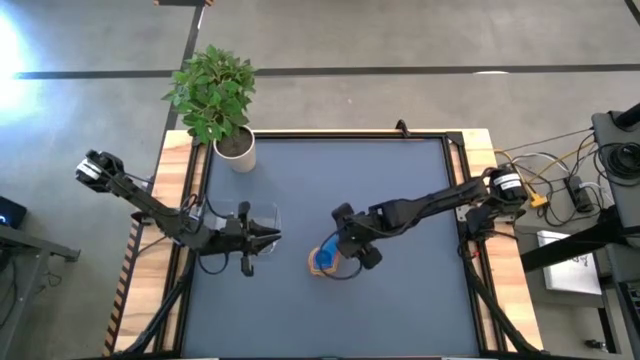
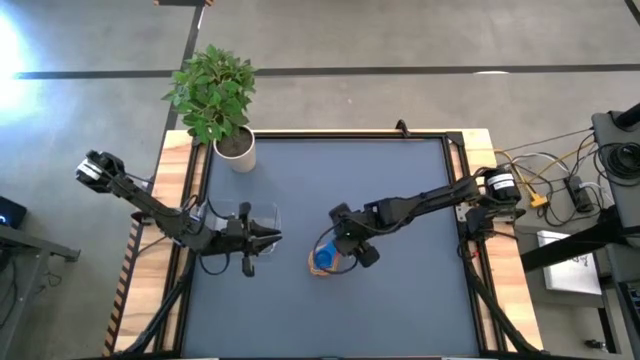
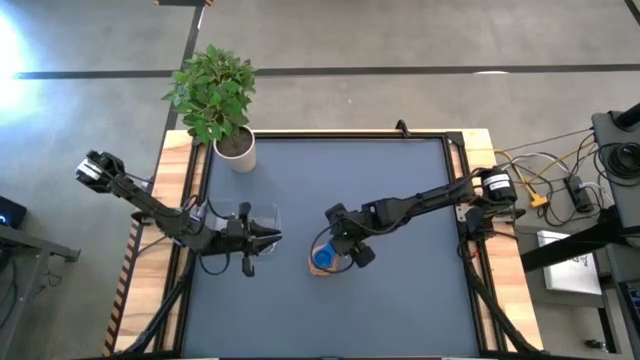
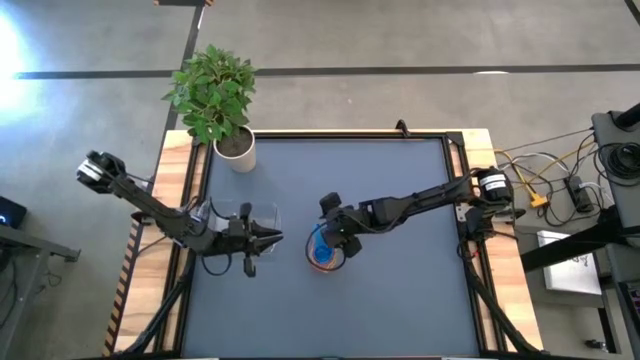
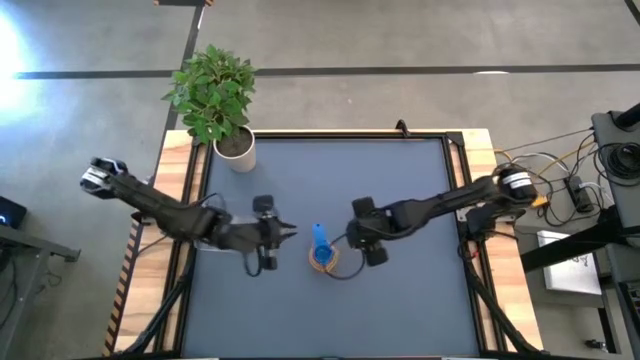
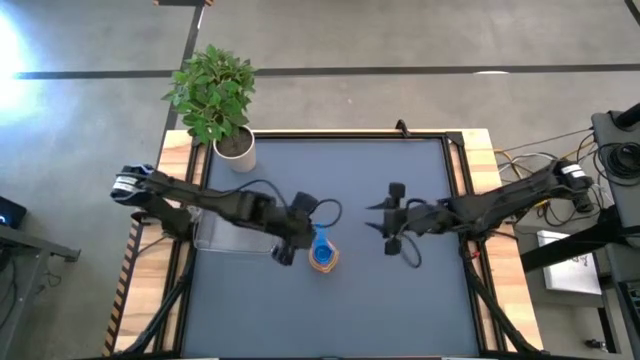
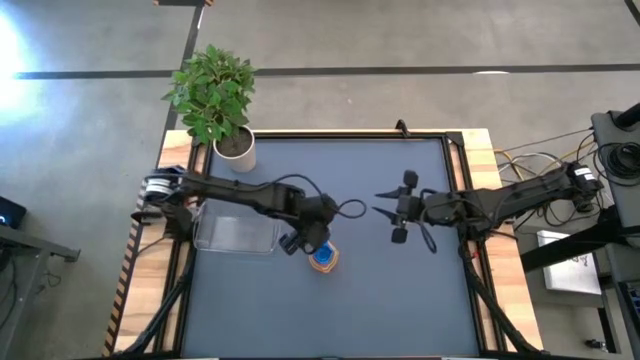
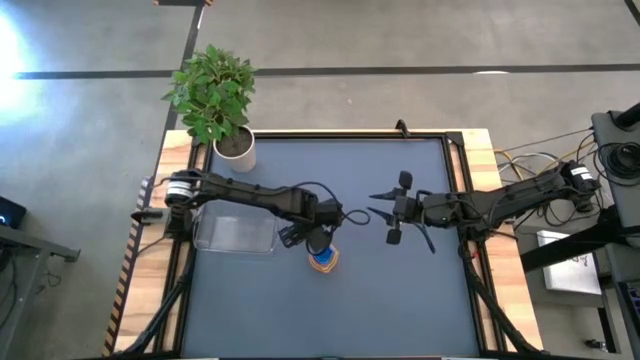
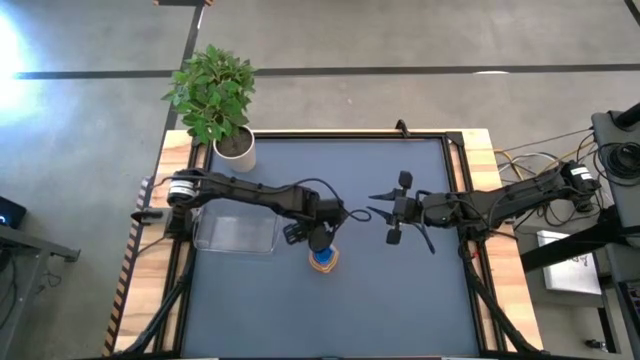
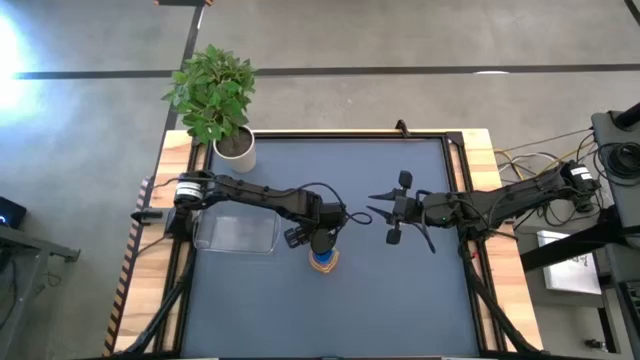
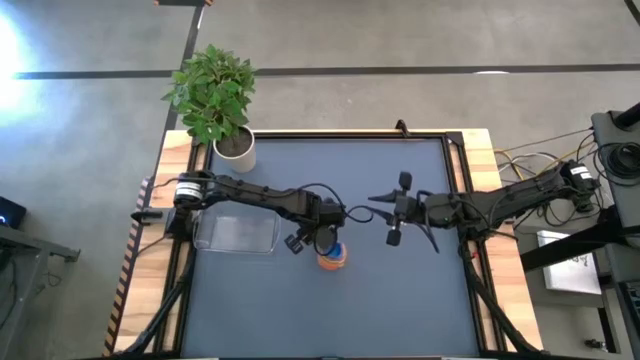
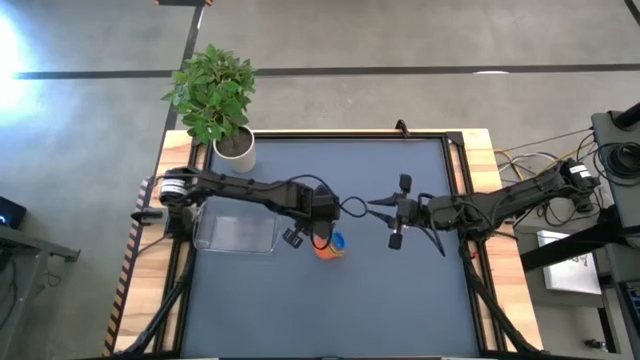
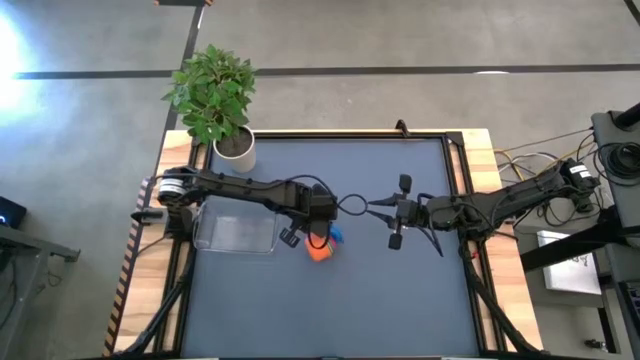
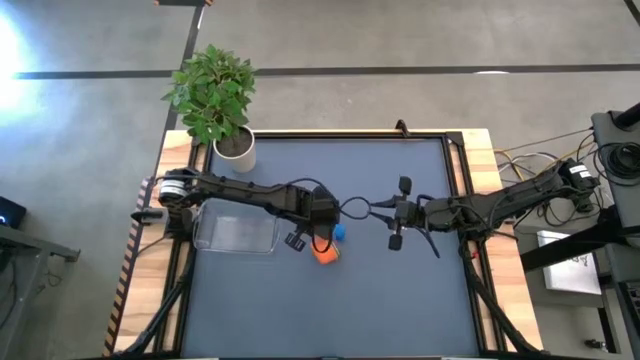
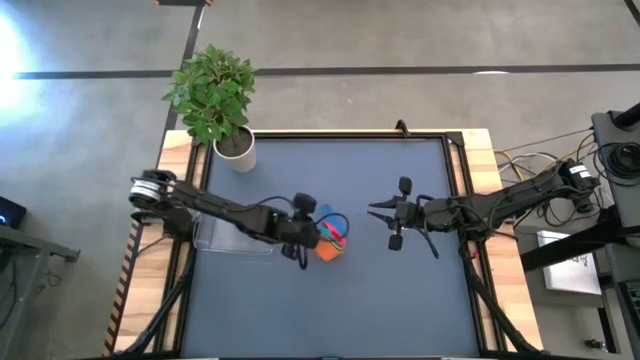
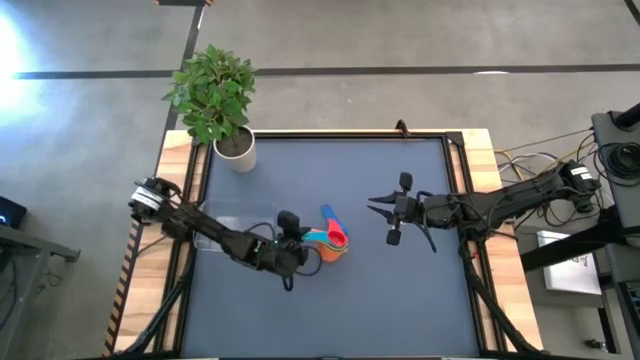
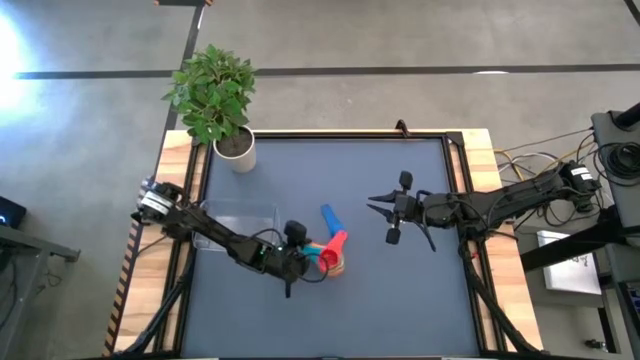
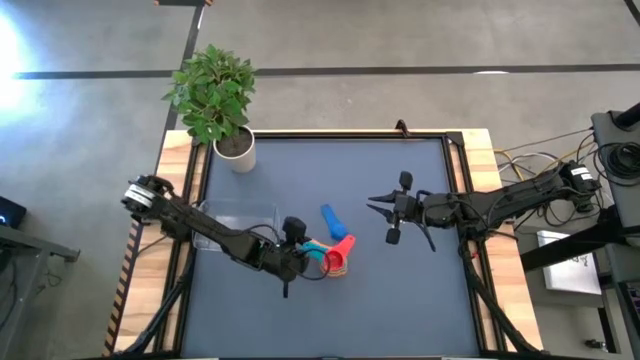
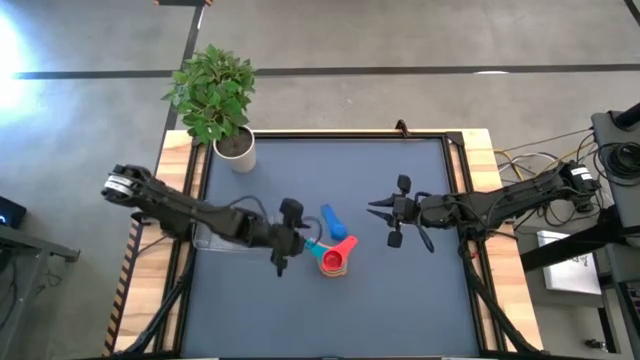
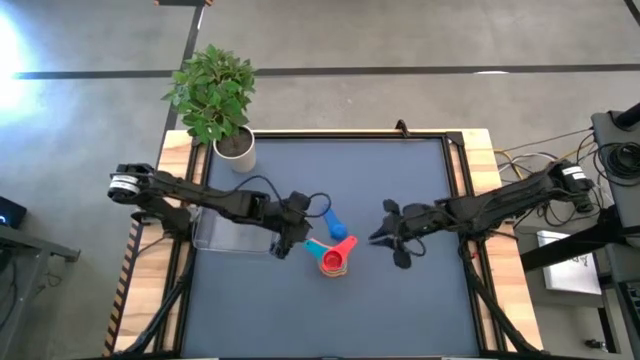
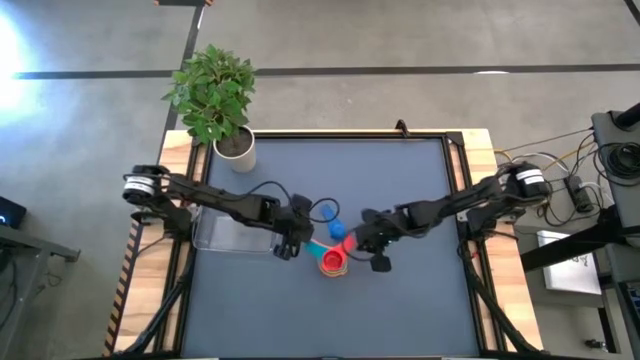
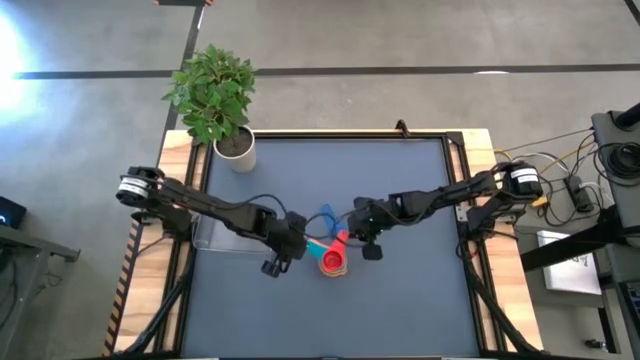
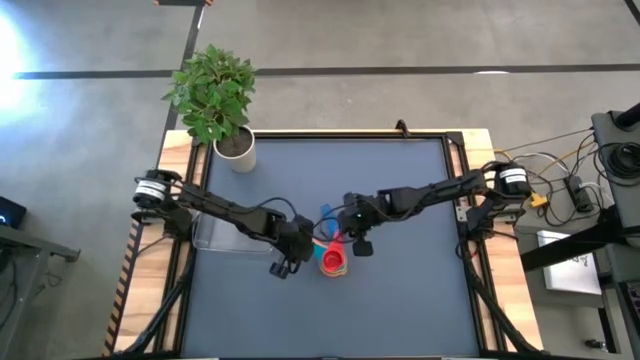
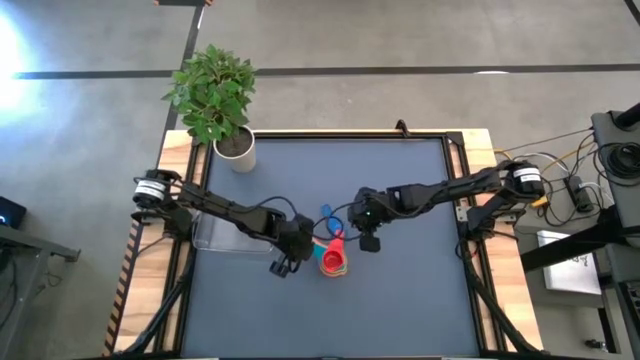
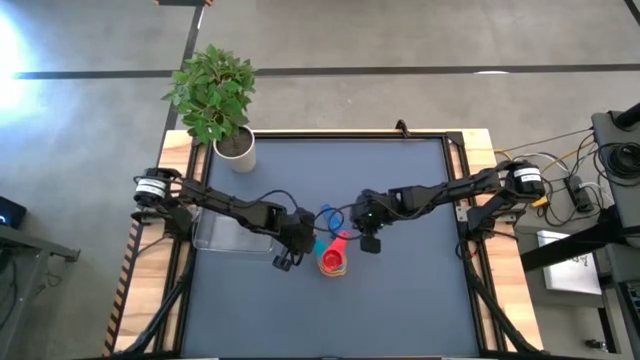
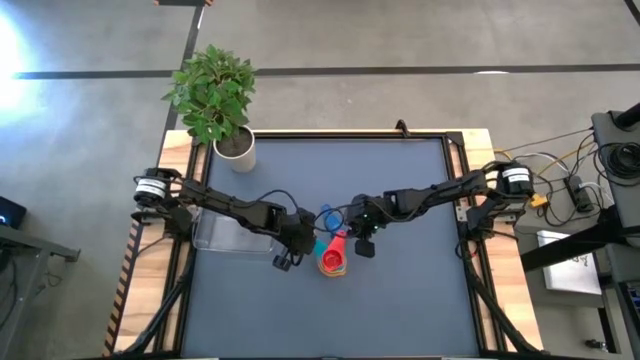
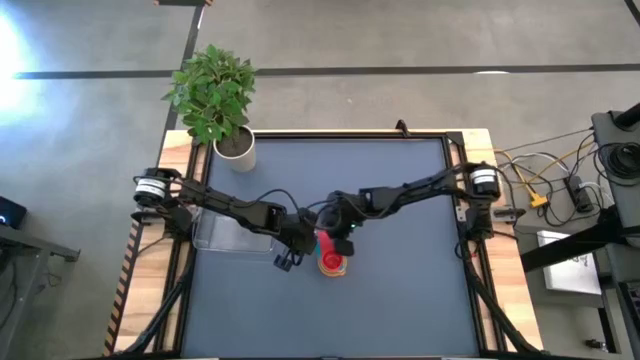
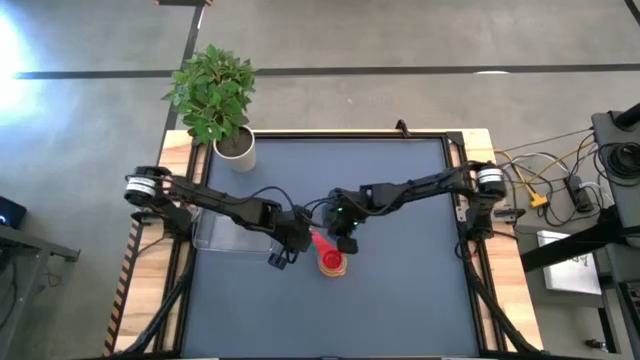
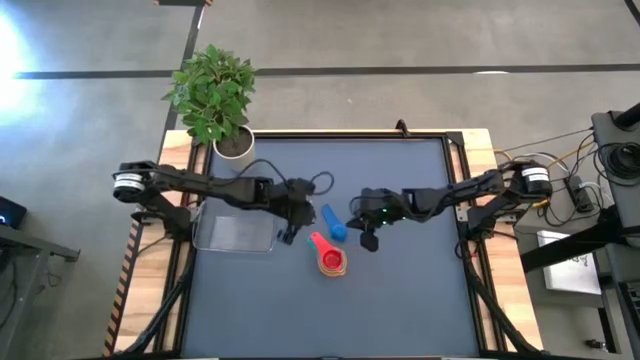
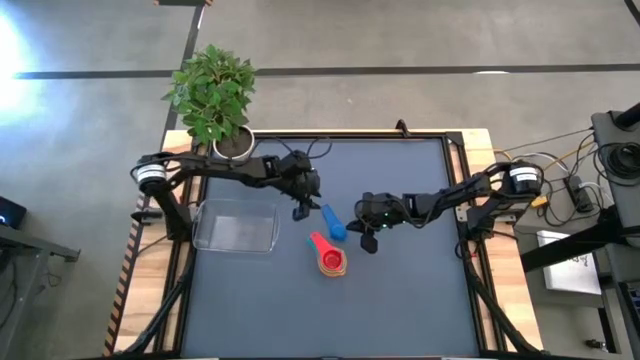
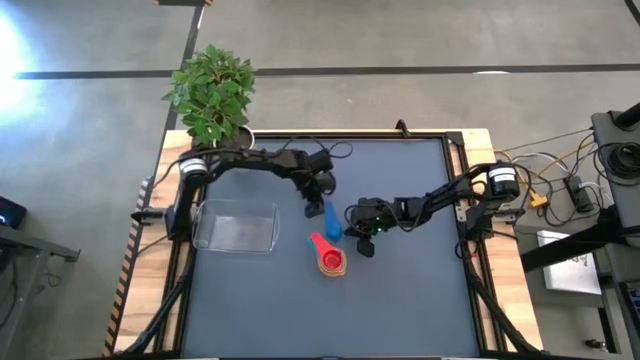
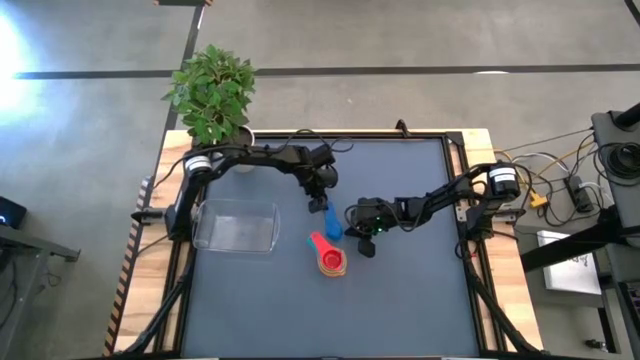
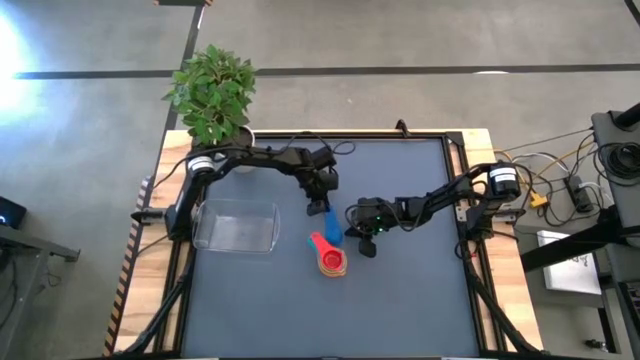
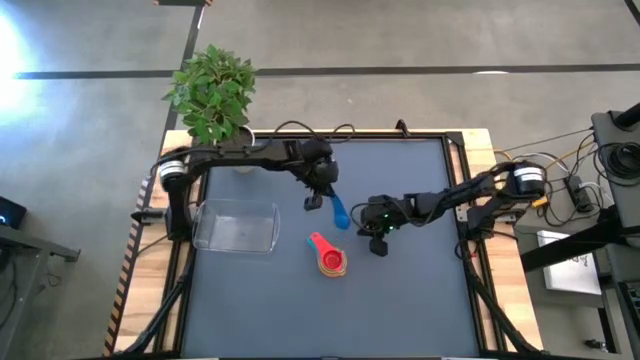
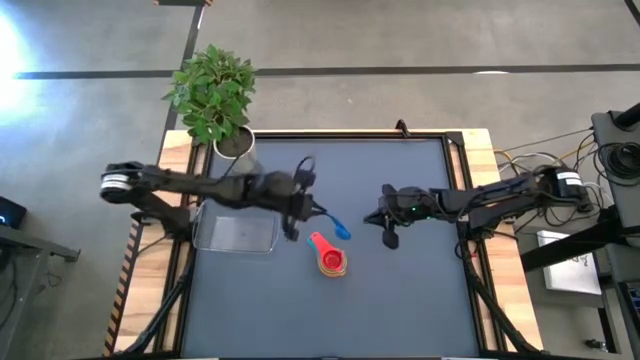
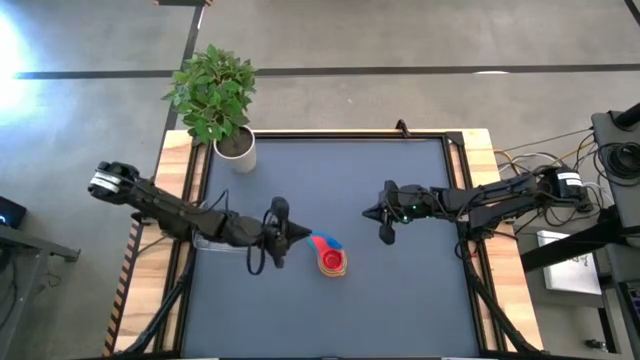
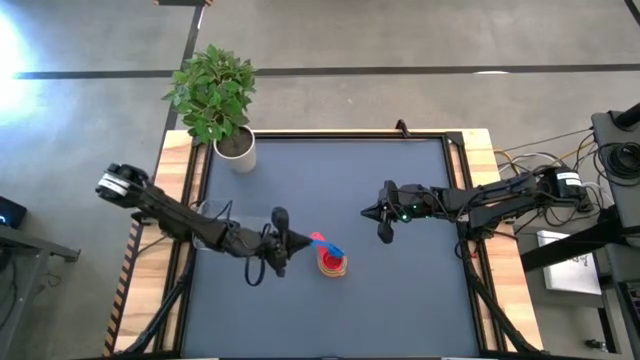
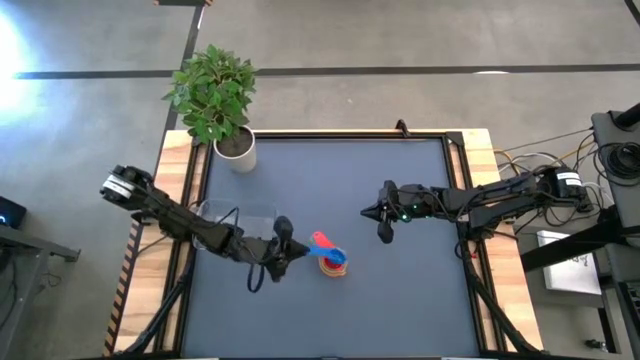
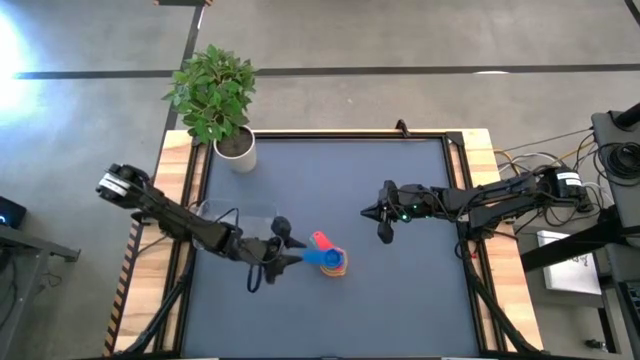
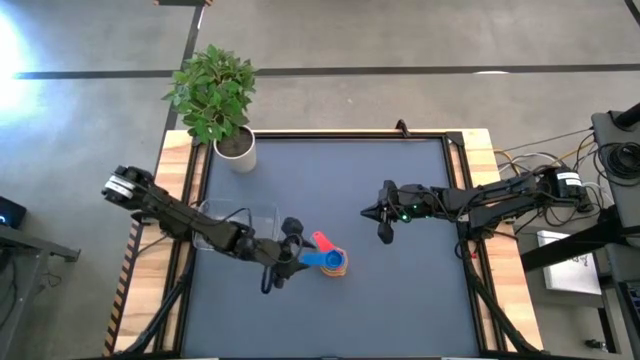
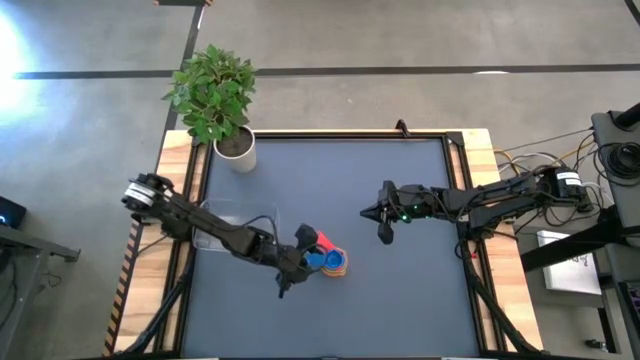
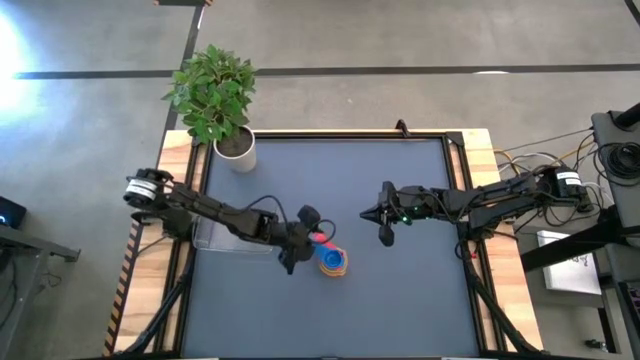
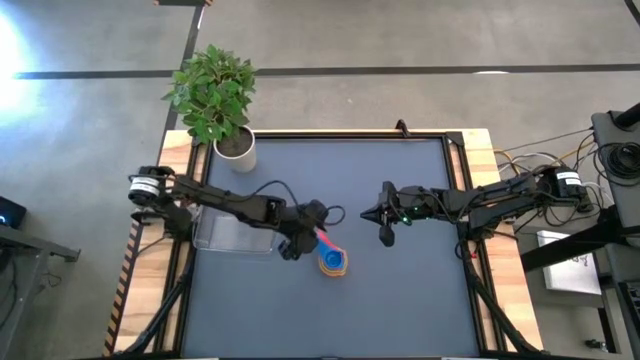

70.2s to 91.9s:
Task: Nest measuring cups in basket
Put the stacked colored measuring cups into the transparent bin
